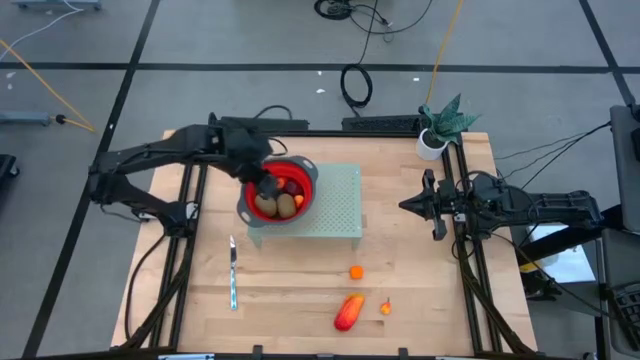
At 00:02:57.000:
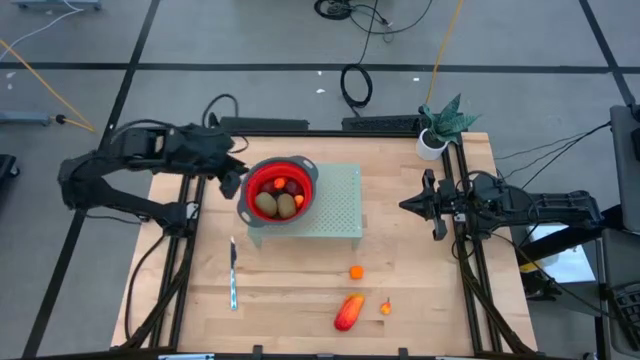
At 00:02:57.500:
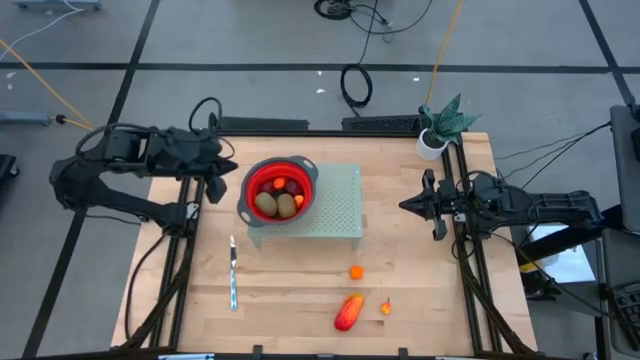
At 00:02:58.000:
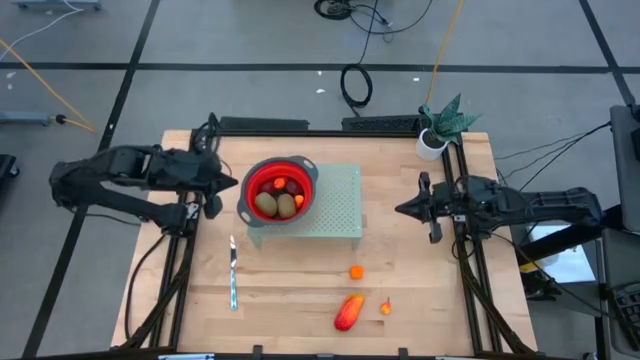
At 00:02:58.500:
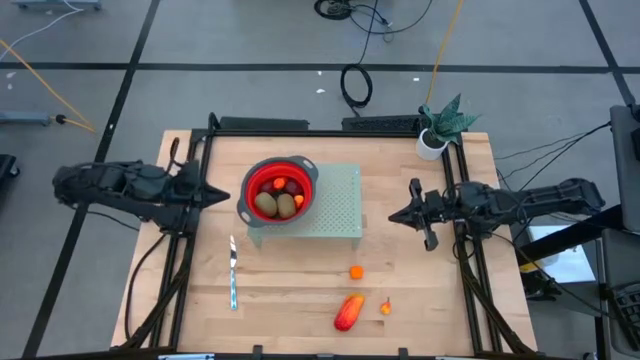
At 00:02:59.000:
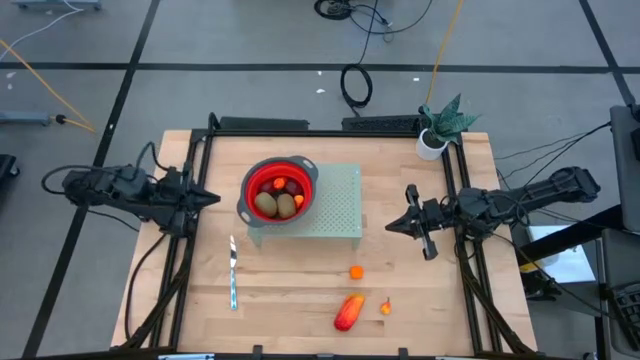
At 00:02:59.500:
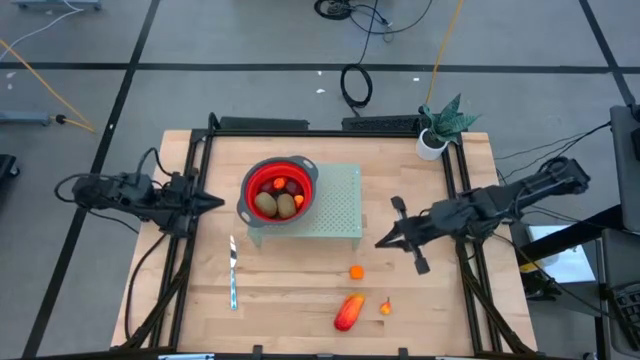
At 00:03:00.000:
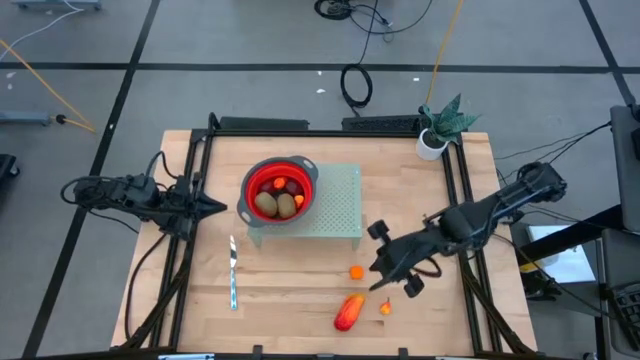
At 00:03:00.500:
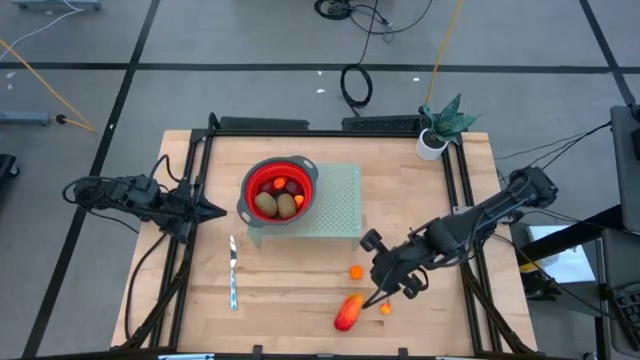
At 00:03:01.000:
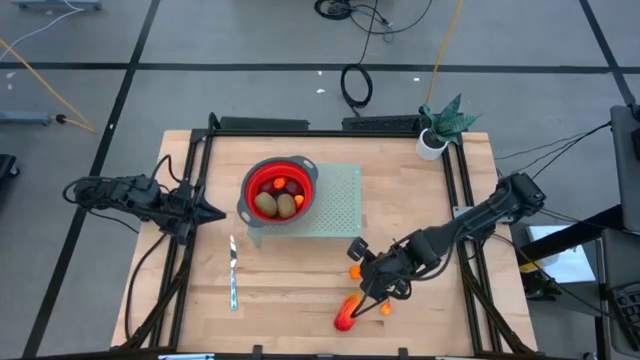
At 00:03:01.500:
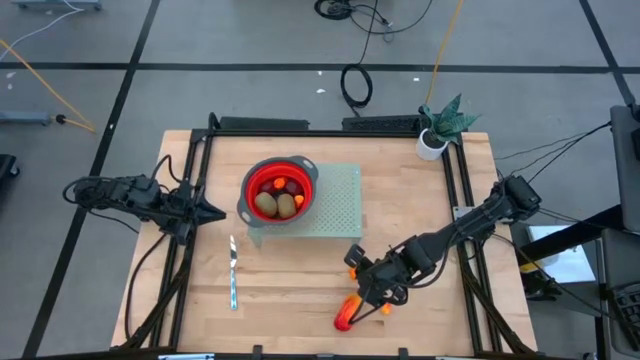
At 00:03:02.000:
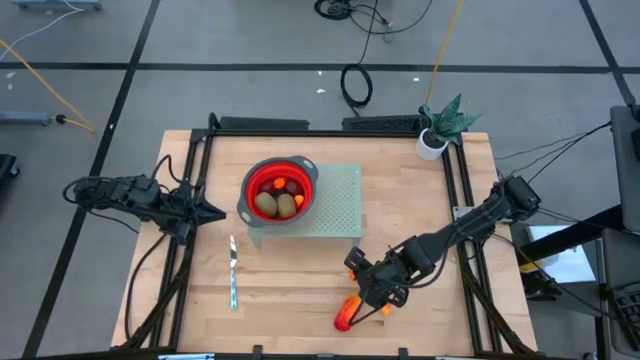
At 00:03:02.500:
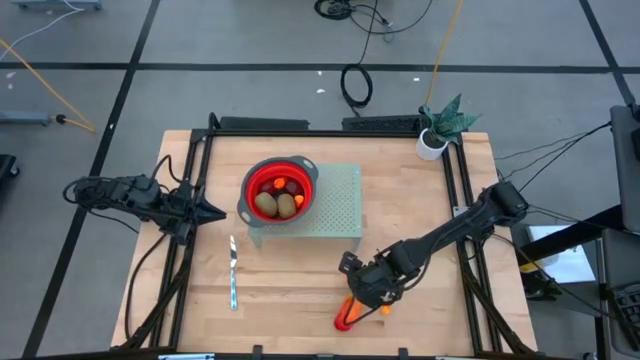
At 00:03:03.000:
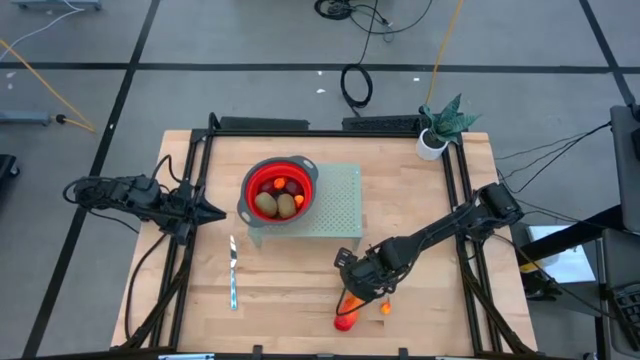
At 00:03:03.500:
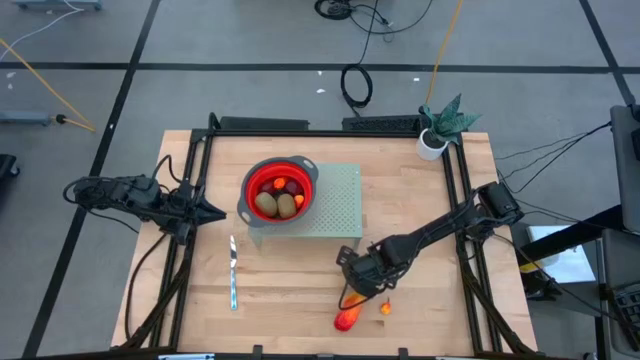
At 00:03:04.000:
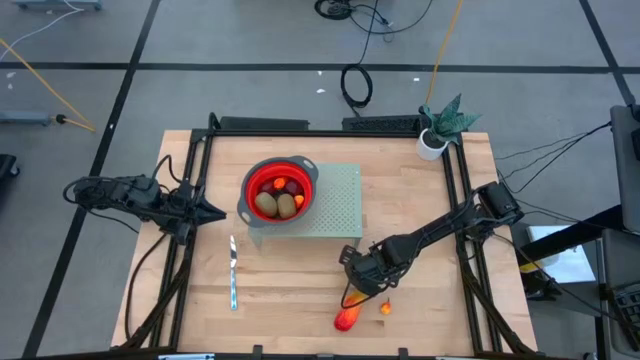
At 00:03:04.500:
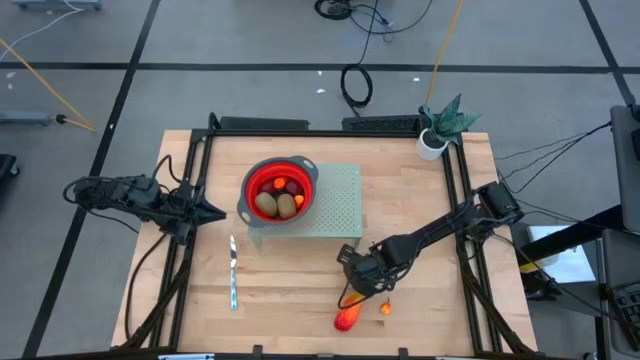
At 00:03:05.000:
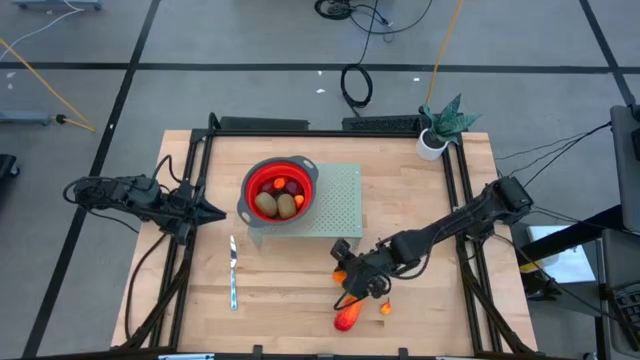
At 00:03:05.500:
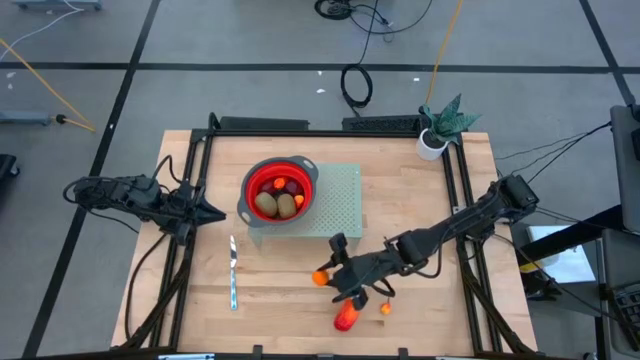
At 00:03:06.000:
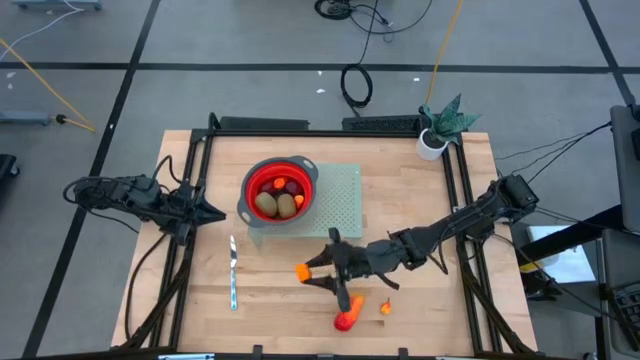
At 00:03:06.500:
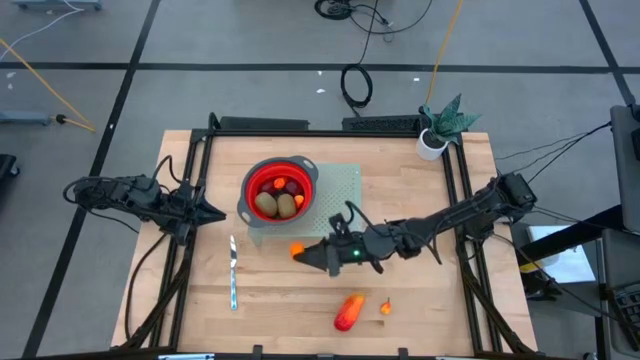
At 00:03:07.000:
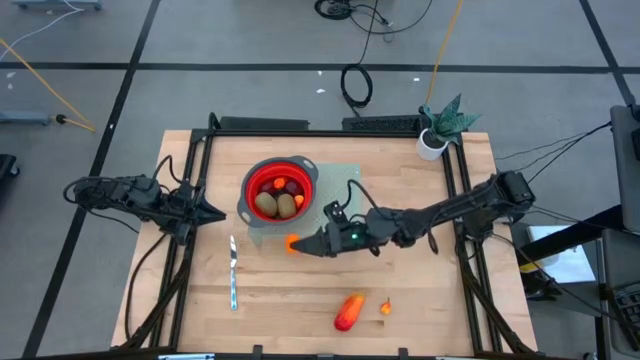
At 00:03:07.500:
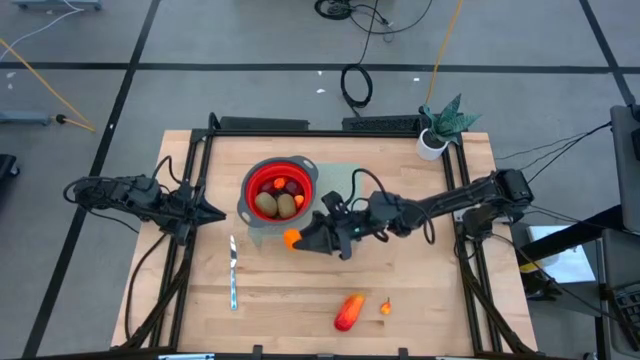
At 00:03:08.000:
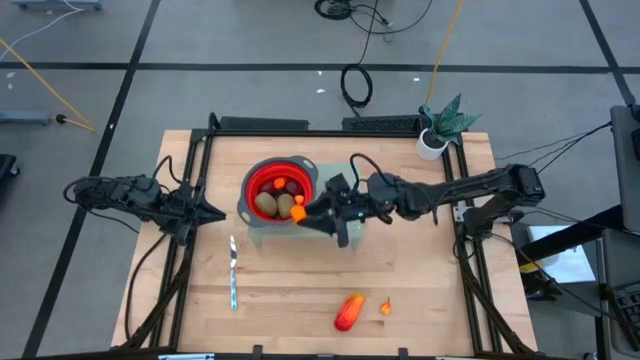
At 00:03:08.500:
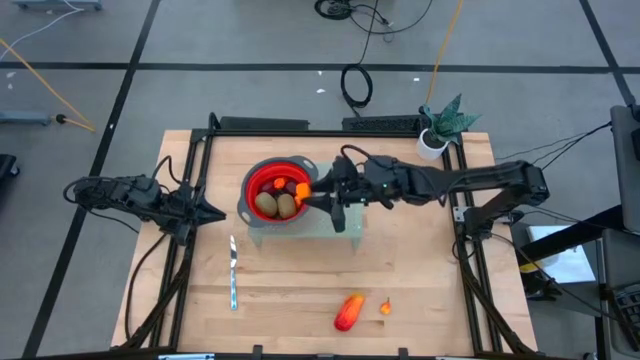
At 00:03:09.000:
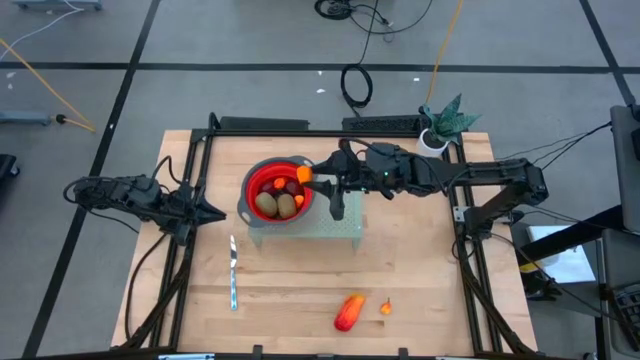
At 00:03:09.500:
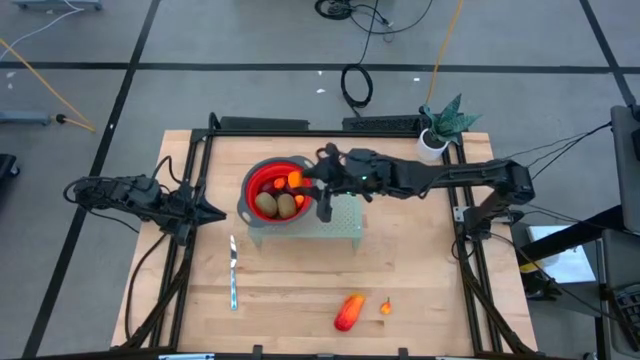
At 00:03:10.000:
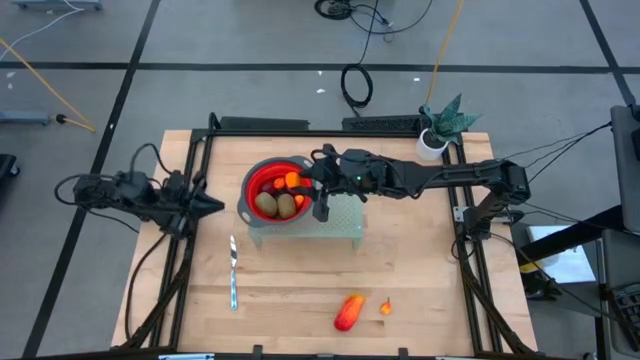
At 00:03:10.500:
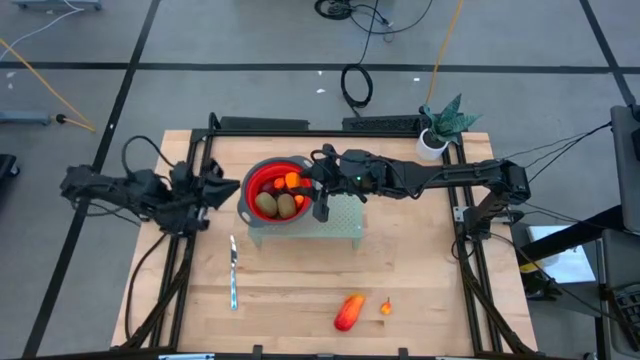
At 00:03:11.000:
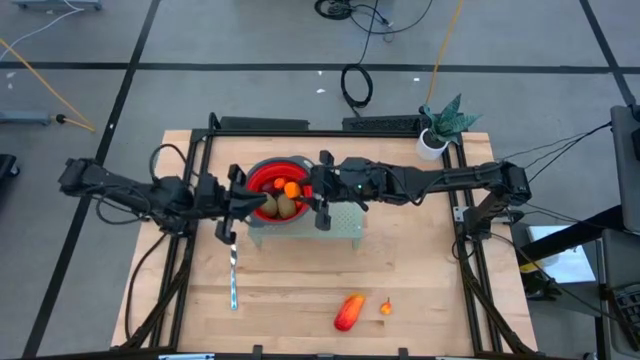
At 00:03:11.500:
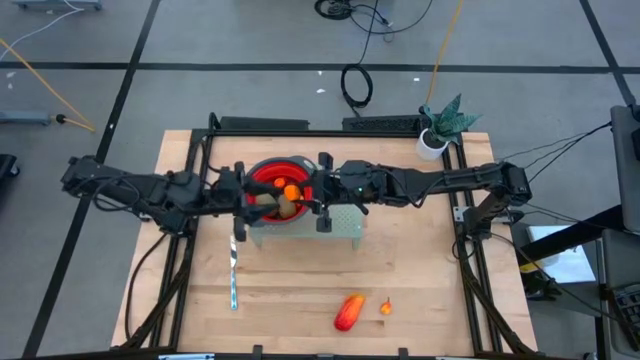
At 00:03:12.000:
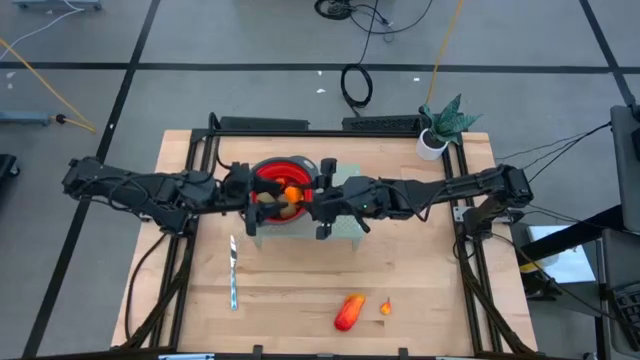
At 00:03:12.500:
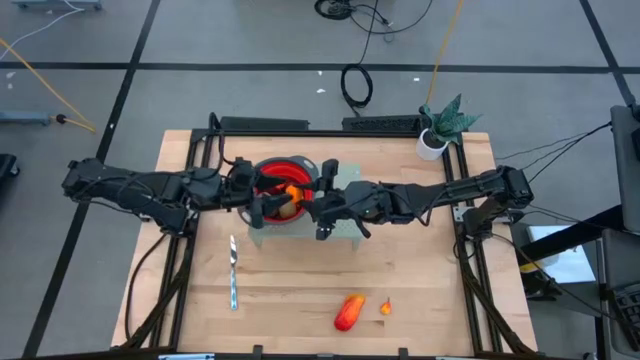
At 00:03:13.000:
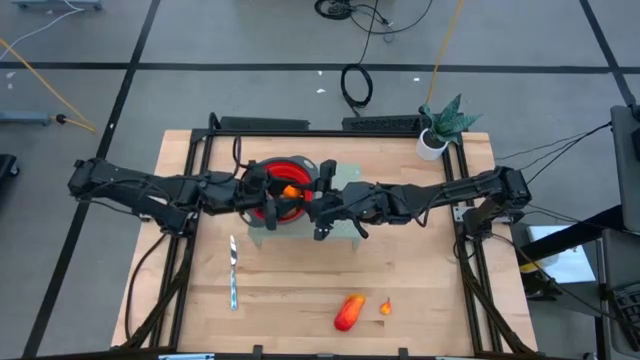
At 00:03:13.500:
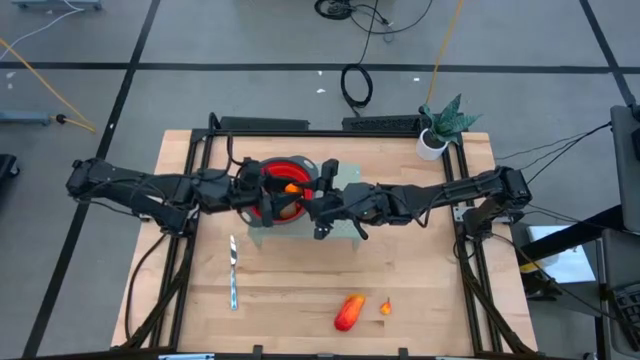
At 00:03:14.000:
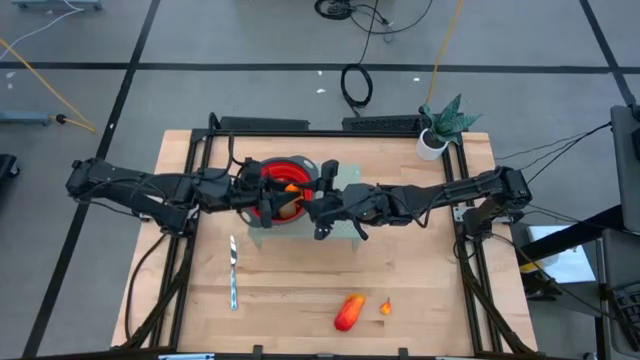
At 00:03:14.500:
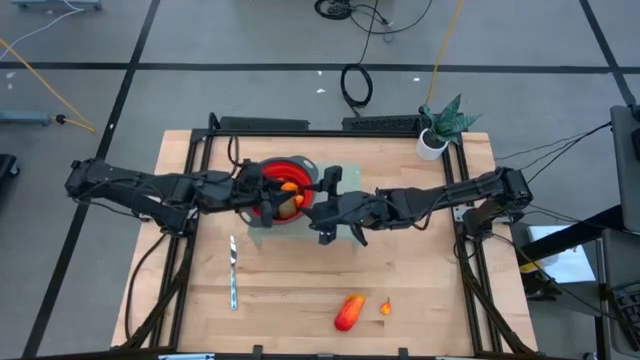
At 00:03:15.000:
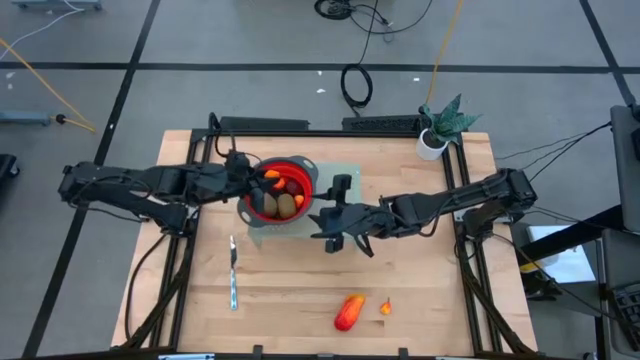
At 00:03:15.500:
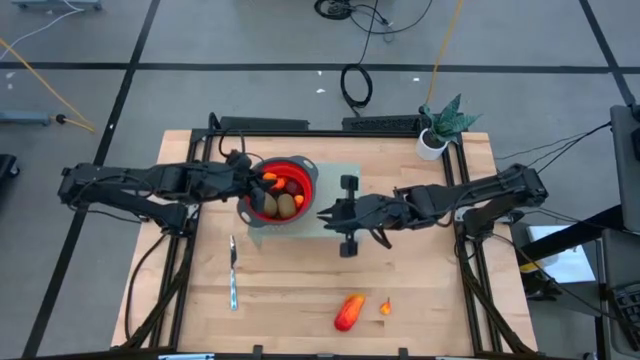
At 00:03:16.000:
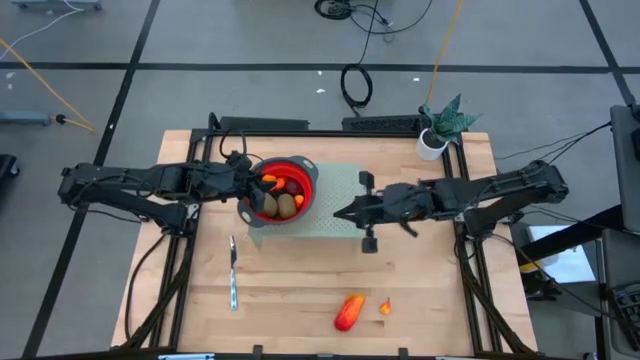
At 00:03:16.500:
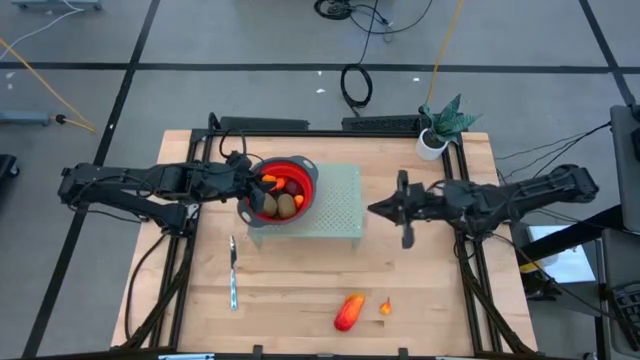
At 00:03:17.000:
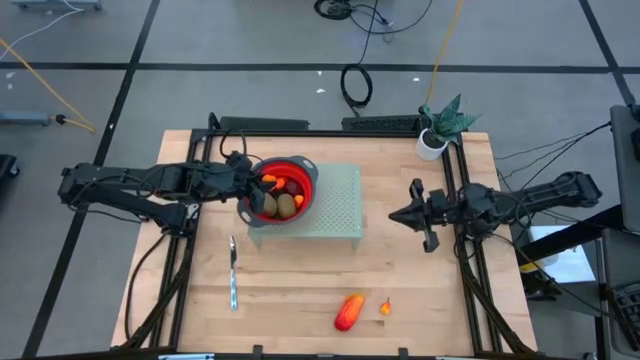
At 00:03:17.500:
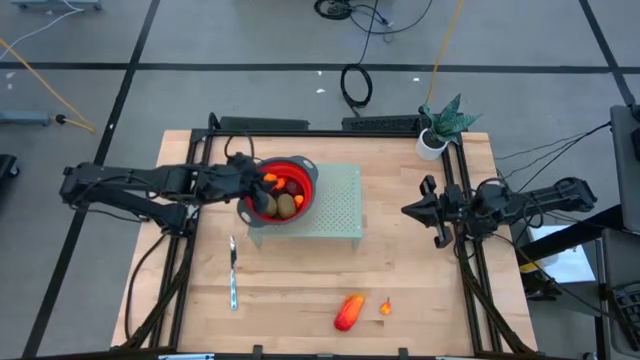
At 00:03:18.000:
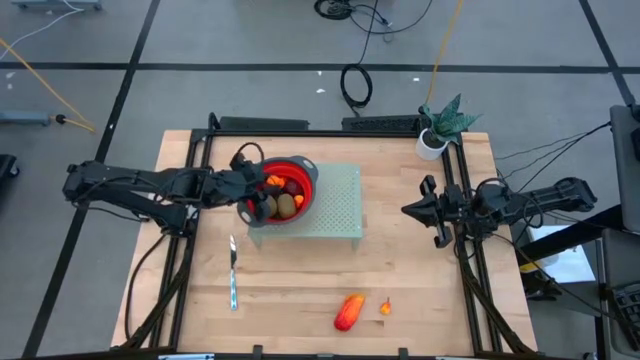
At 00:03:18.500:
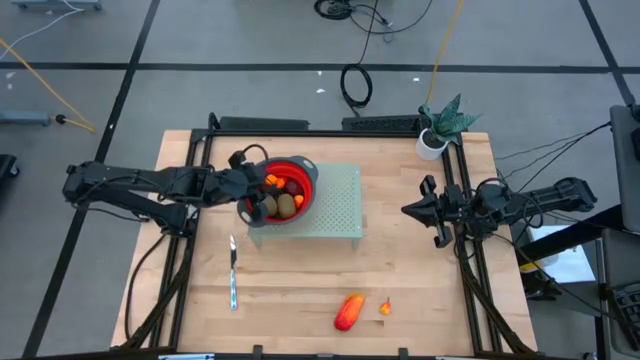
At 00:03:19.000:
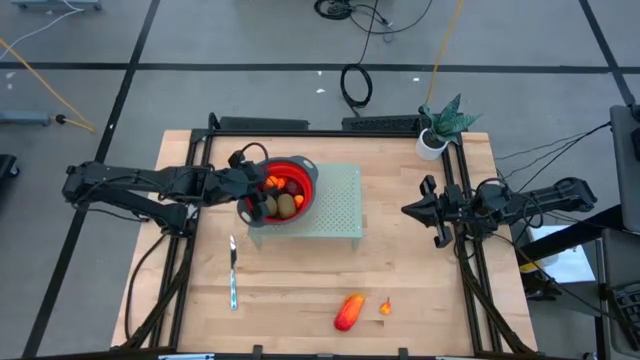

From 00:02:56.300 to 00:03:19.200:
Task: Pick & Place Fruit
Put the orange into the strainer bowl on the shelf
